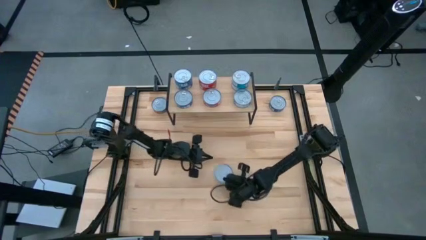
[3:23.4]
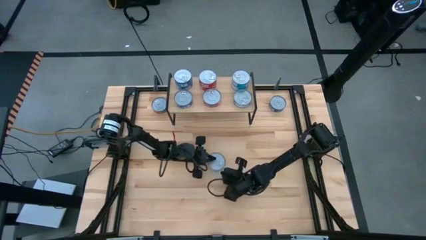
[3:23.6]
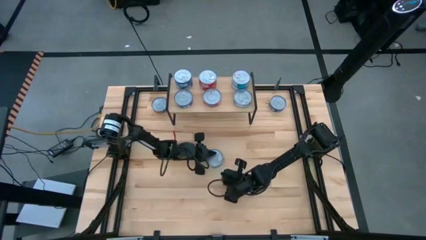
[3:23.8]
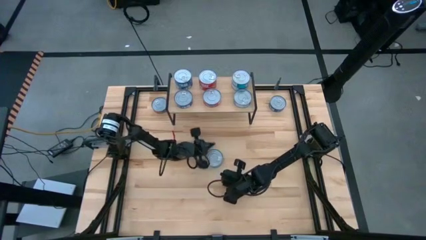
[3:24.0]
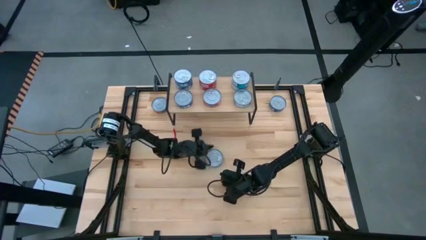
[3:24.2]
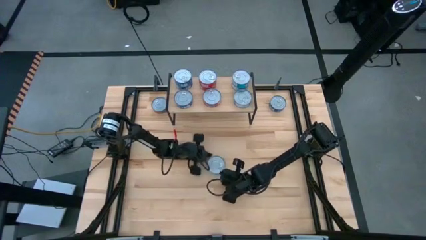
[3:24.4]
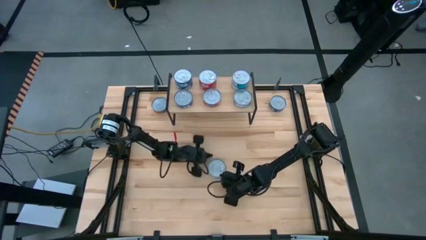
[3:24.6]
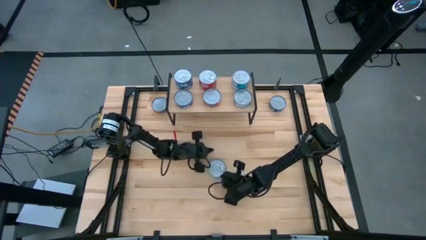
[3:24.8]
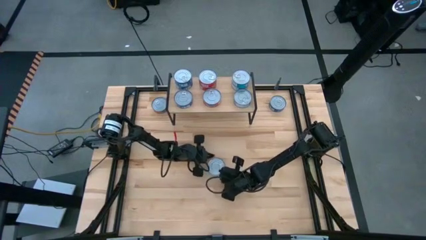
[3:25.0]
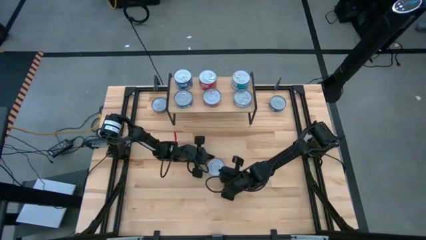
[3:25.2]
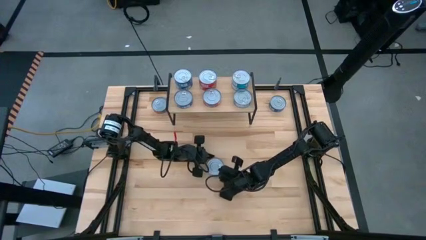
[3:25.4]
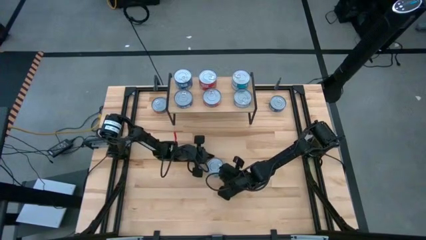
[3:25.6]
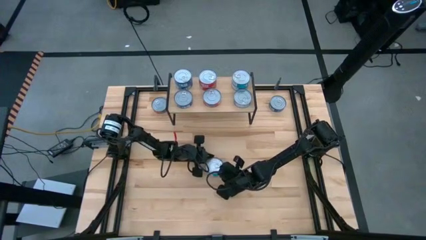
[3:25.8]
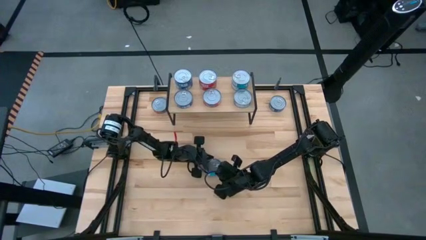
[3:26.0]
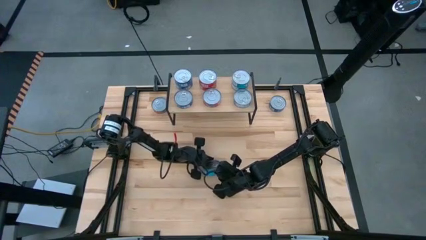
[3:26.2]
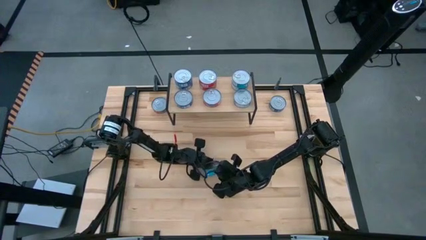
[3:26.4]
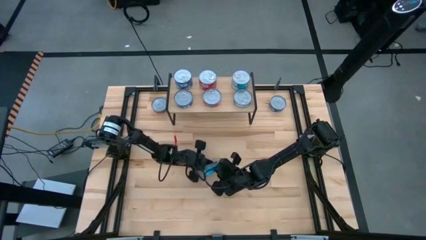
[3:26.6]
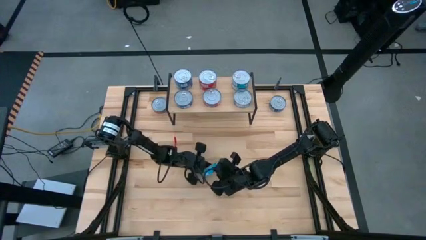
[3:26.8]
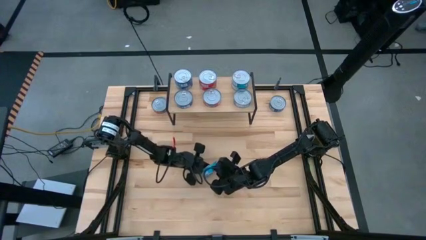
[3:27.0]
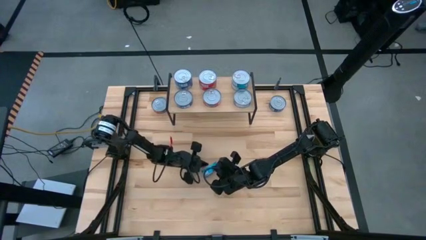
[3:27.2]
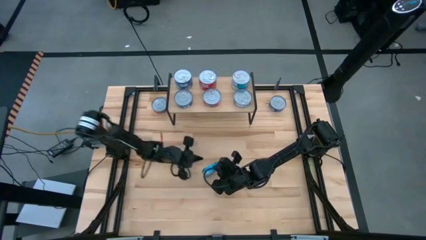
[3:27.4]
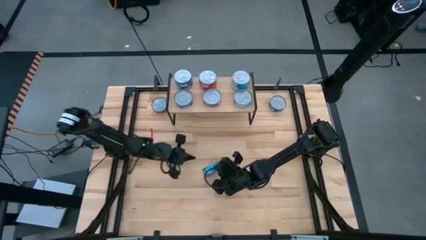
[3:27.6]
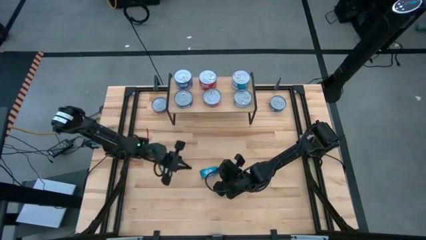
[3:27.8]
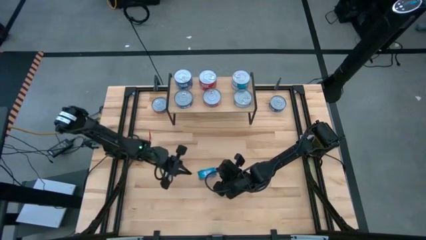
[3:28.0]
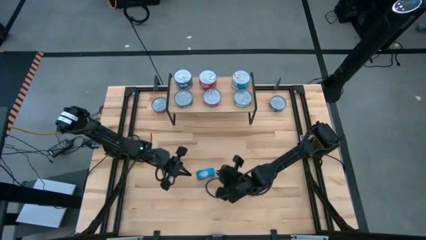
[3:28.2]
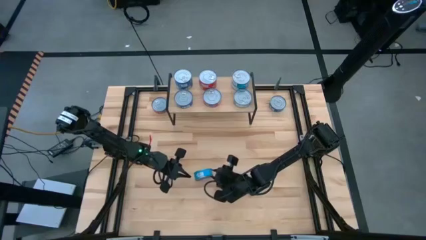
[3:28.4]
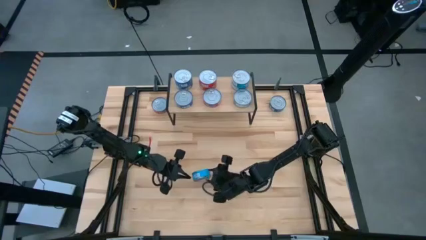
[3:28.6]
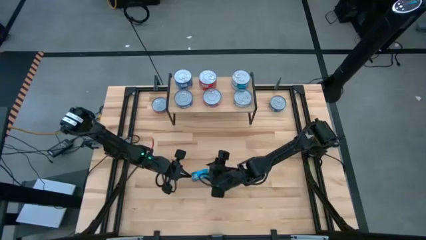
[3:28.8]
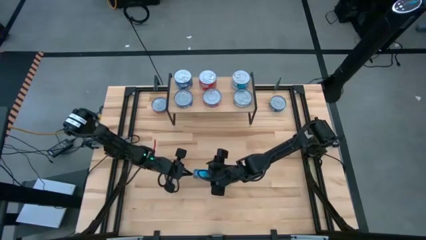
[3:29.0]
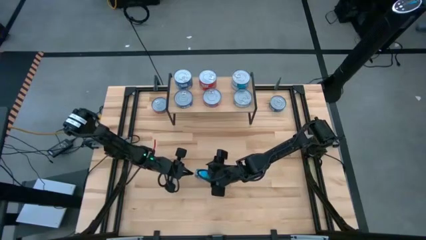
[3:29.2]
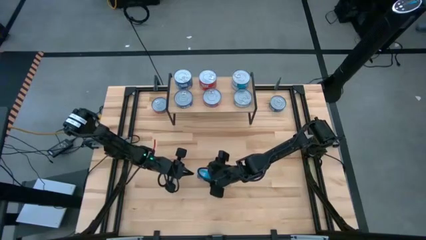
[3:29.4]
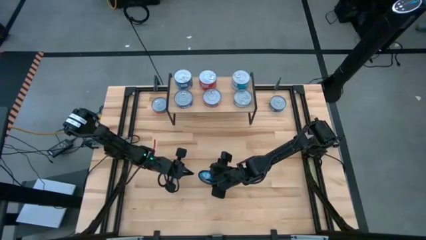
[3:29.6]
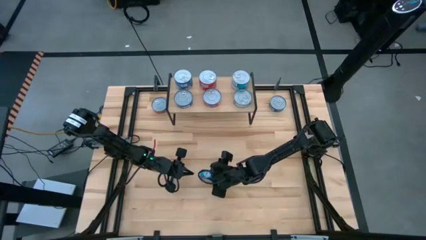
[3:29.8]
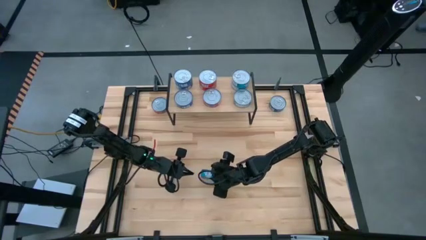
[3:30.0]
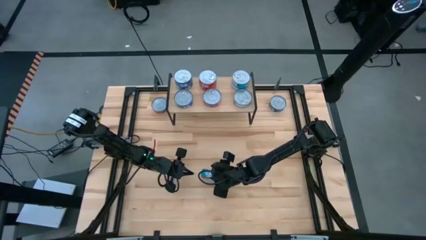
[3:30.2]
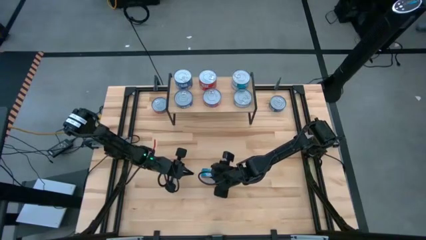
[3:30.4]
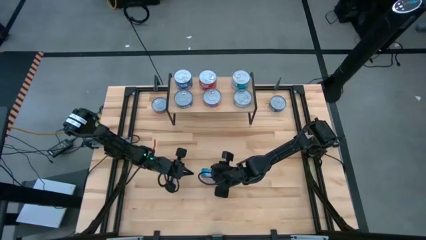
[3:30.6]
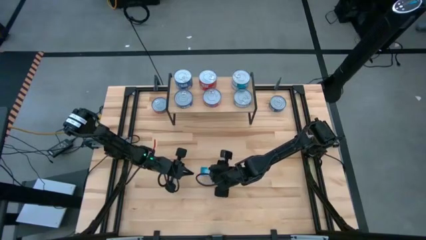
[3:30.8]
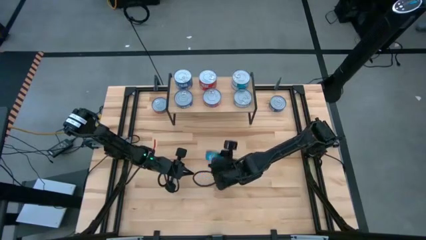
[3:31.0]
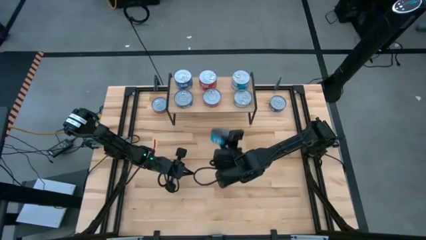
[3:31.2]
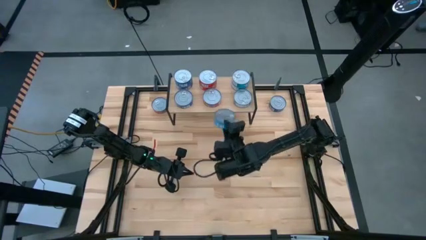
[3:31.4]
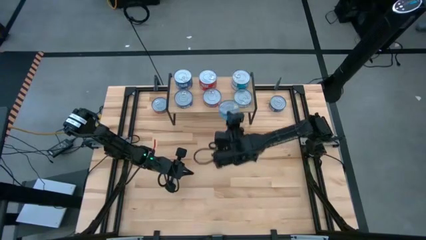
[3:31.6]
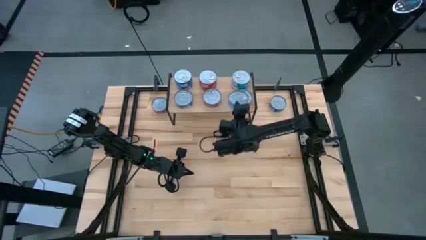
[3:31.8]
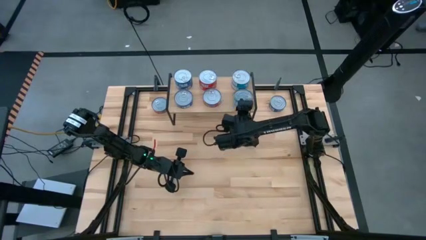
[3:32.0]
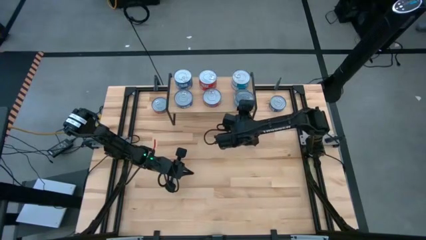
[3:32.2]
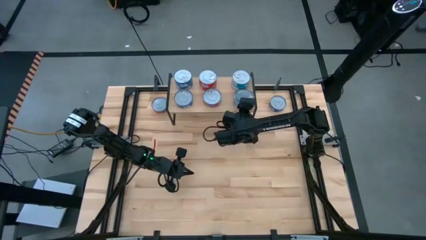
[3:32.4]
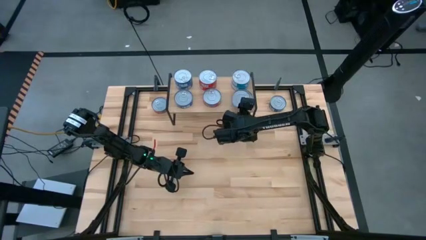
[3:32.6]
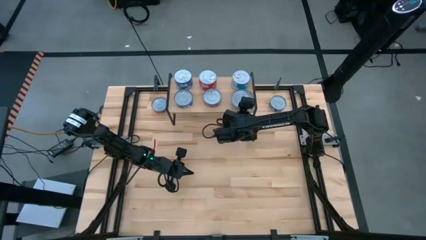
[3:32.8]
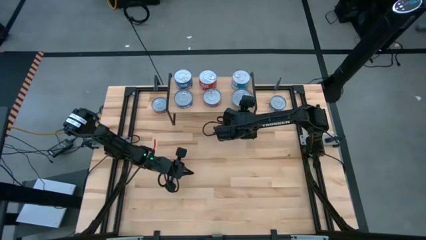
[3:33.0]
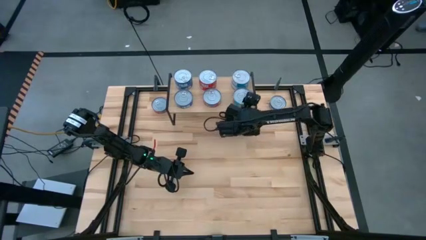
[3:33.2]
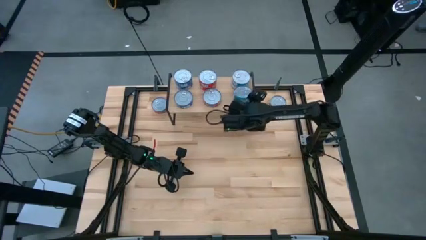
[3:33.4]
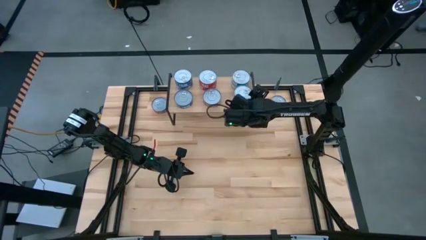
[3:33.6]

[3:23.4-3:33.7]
Task: Stack canned seafood by type on shelf
Stack the yellow blue tuna can on top of the yellow blue tuna can on the shelf
